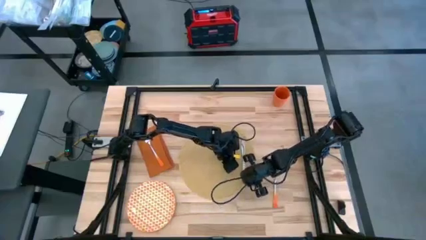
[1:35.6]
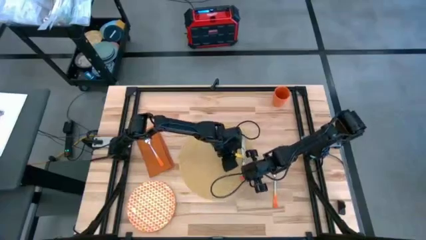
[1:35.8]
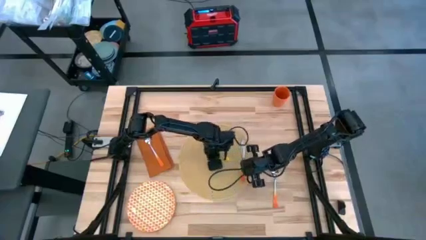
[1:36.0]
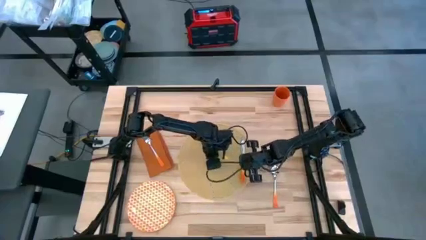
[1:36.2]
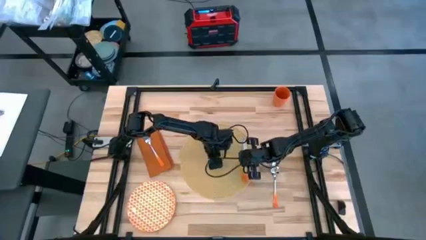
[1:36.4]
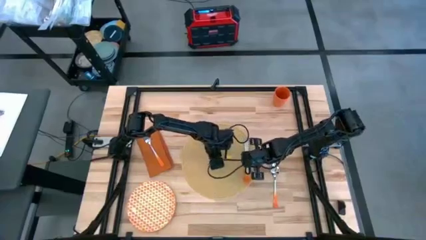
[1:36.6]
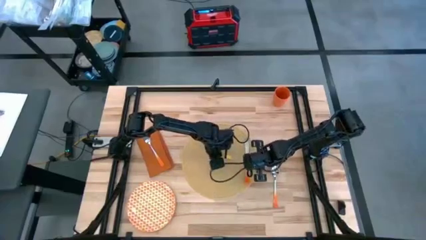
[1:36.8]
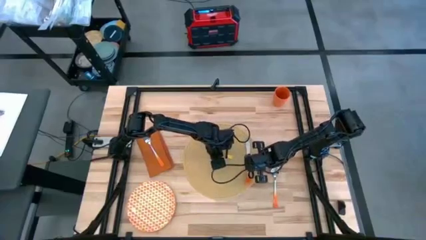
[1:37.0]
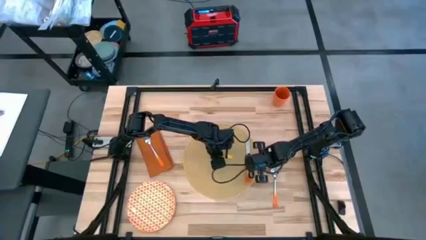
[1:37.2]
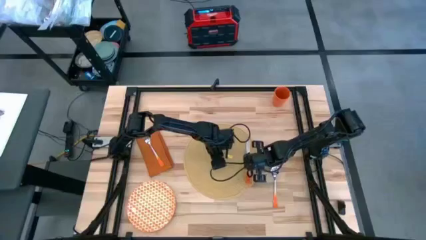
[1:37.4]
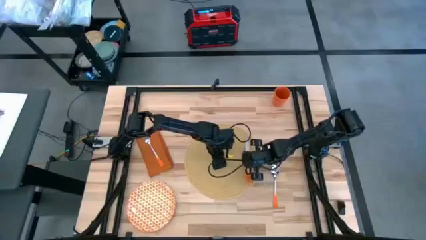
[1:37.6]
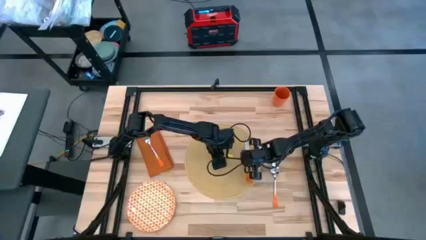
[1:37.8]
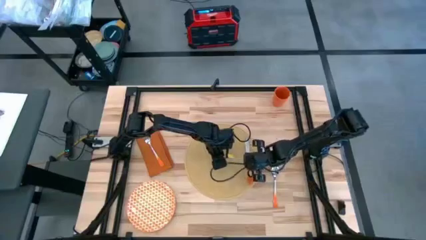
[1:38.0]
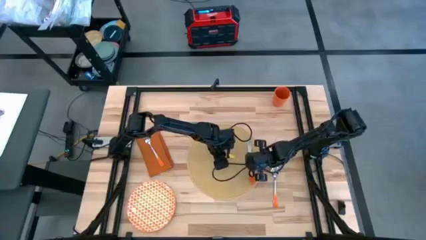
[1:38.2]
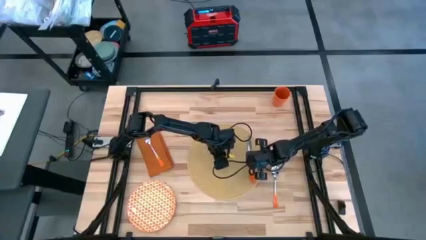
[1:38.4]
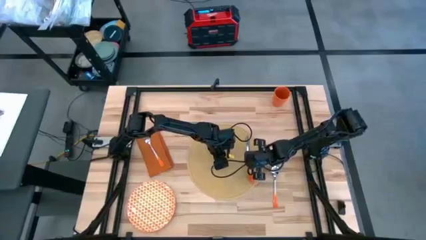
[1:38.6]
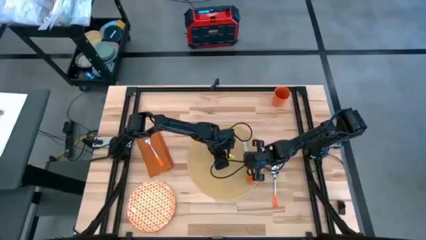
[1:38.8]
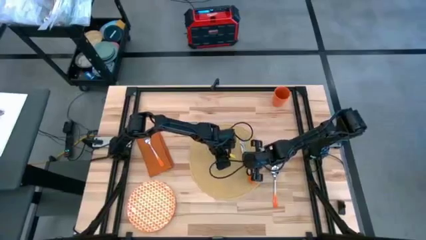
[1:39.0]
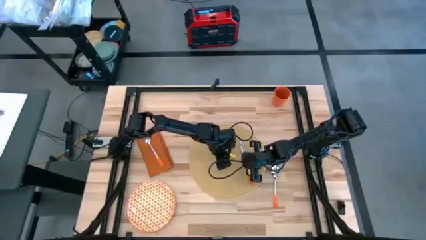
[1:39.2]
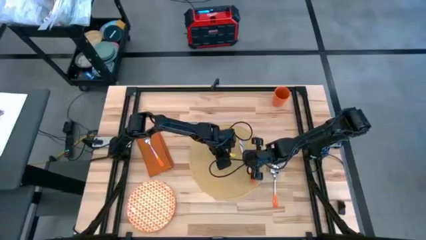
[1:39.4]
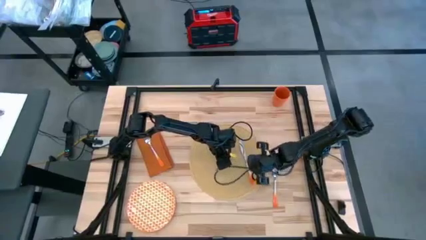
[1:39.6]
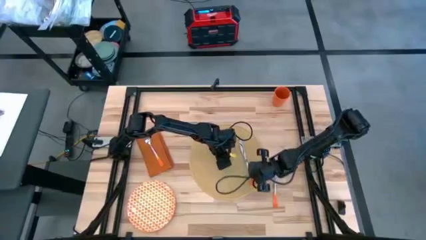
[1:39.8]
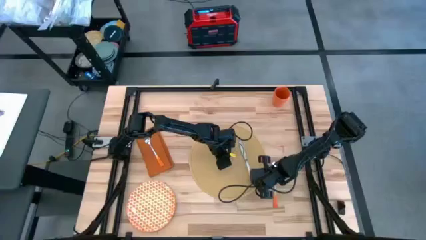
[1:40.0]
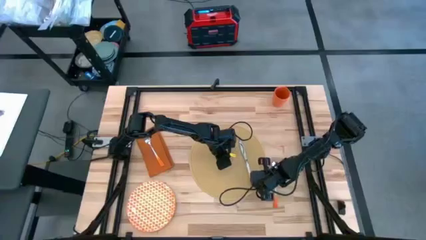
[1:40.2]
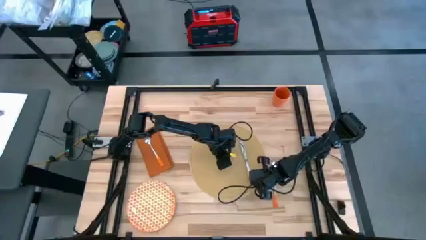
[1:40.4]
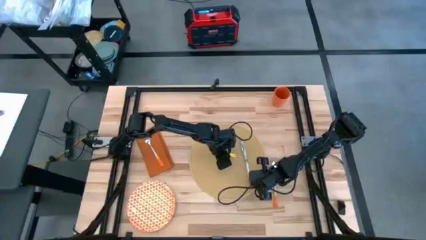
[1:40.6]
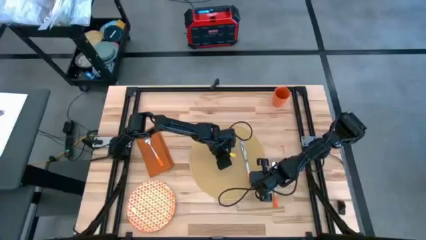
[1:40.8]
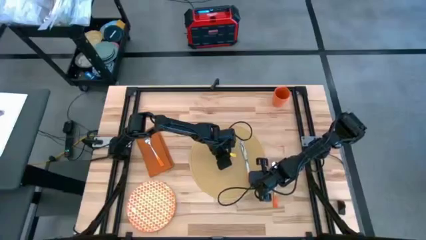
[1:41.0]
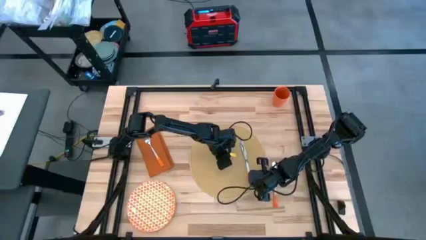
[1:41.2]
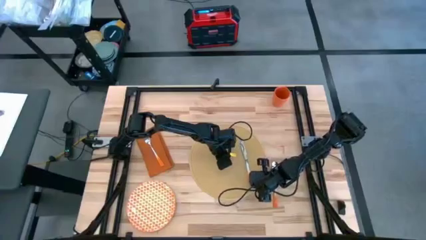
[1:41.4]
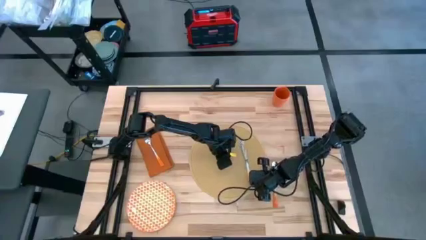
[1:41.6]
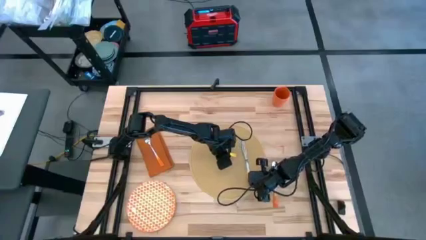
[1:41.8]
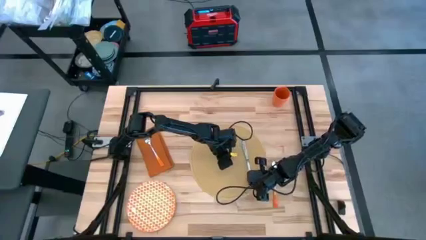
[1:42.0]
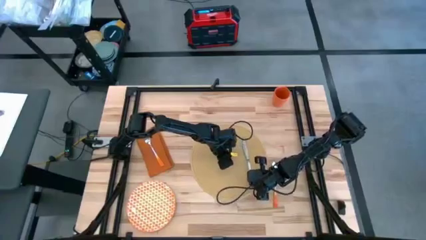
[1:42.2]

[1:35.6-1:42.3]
Task: Set table place
Adjust the table knife

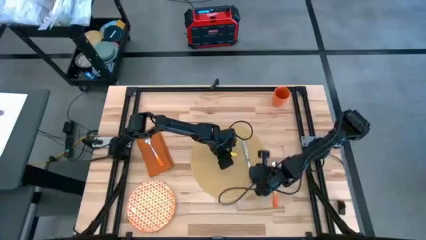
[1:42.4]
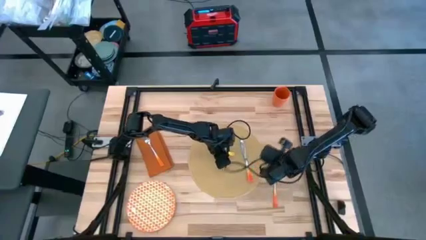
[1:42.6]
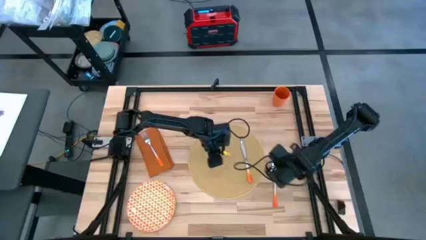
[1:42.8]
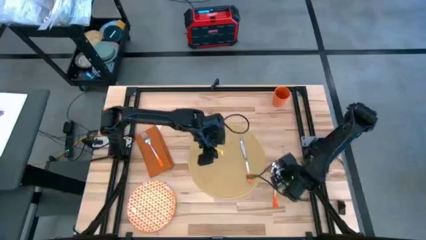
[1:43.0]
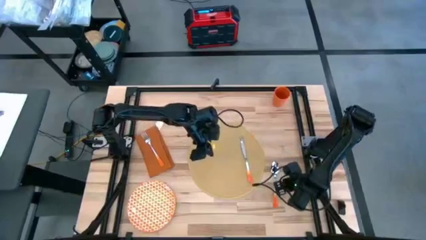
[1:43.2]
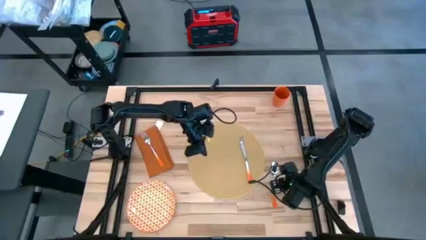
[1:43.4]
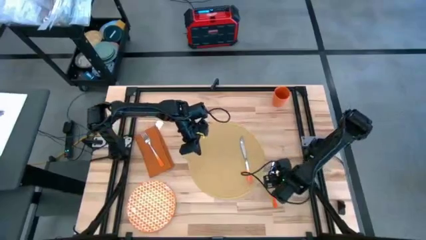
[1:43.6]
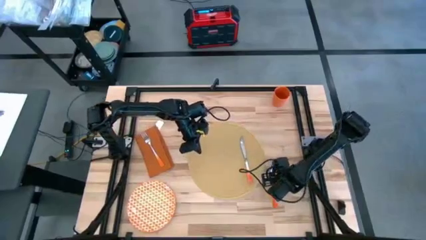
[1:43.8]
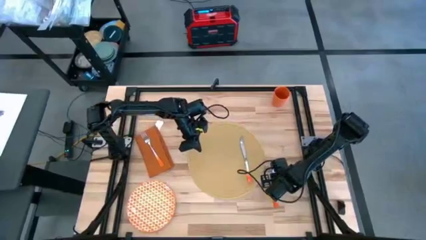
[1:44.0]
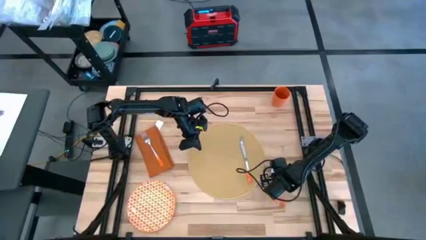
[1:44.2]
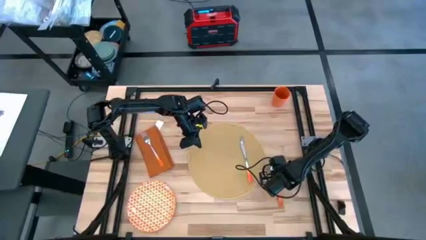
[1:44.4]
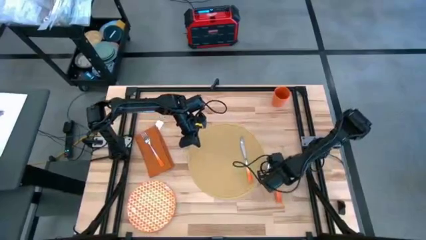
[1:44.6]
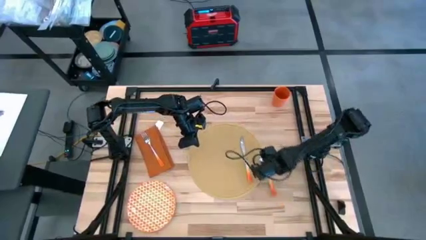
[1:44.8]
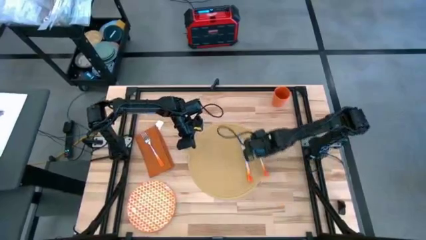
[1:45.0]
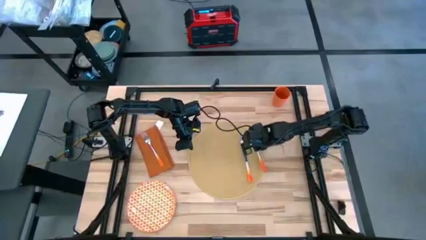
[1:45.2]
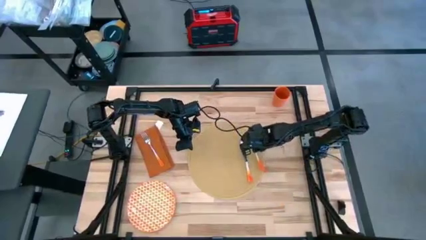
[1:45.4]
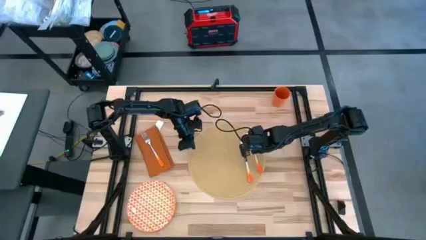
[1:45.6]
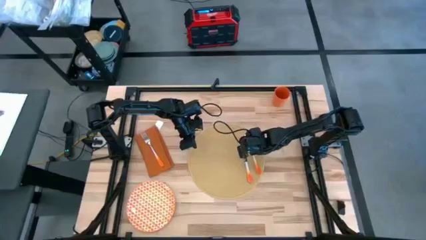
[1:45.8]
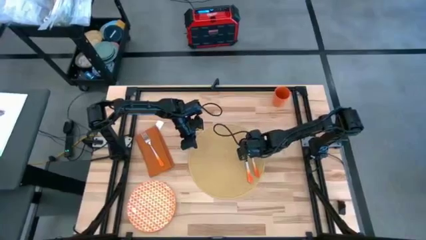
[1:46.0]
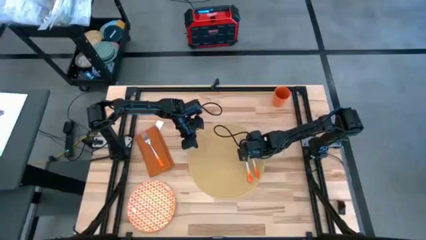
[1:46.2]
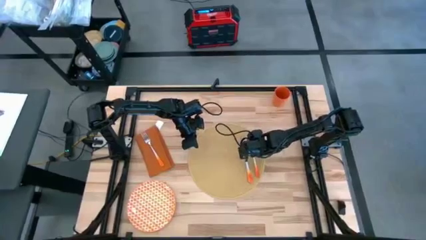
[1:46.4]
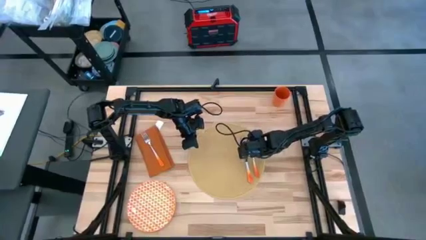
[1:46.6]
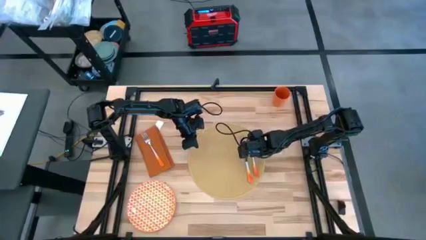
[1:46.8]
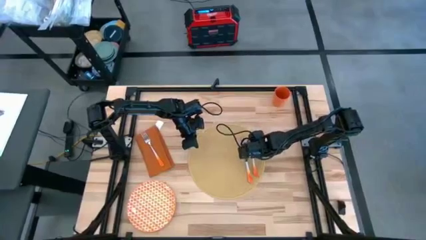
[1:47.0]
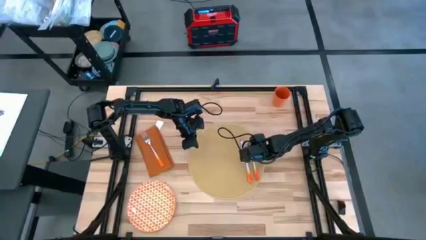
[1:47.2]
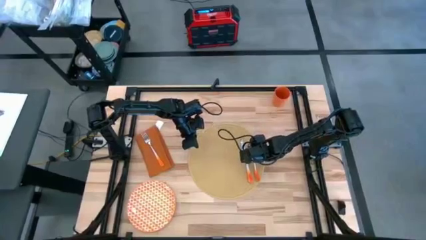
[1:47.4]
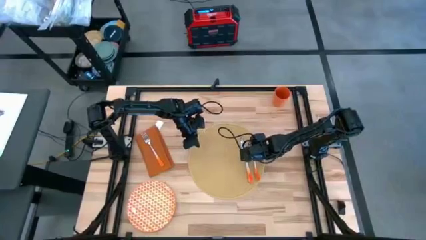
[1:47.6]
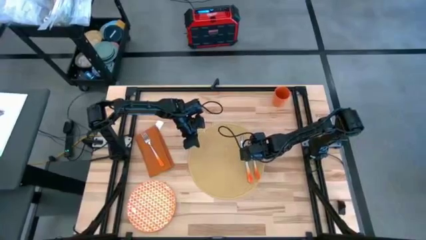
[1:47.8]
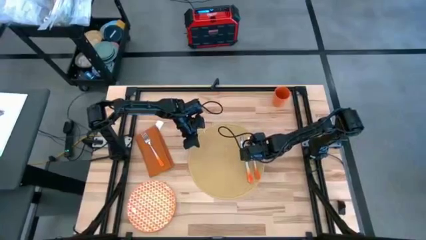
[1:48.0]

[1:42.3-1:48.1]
Put the spoon on the placemat to the right of table knife

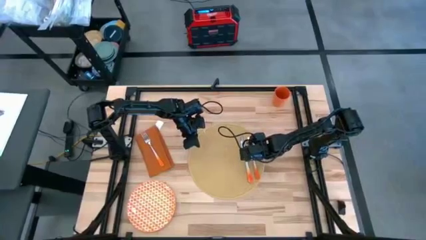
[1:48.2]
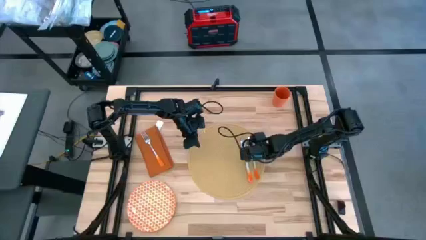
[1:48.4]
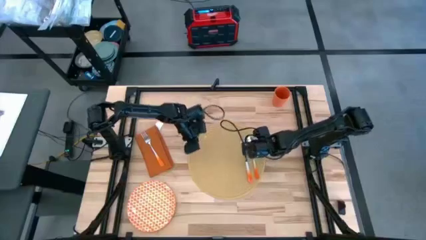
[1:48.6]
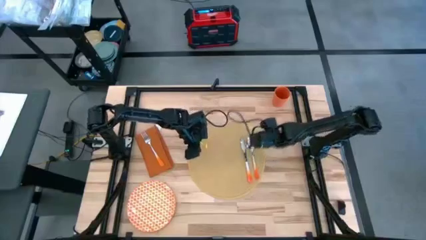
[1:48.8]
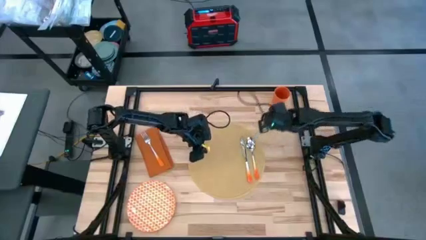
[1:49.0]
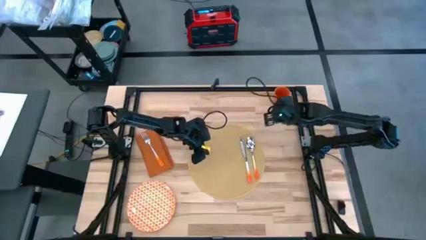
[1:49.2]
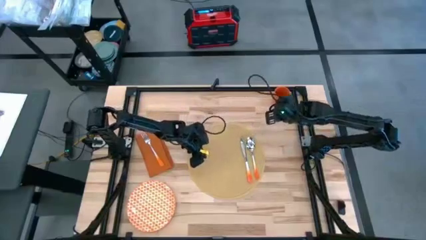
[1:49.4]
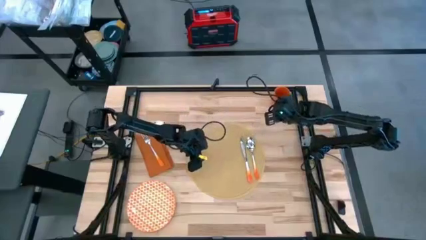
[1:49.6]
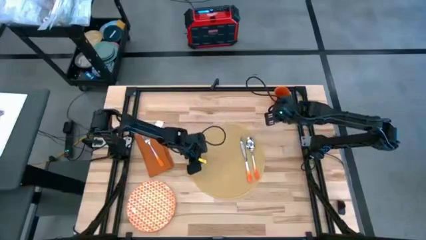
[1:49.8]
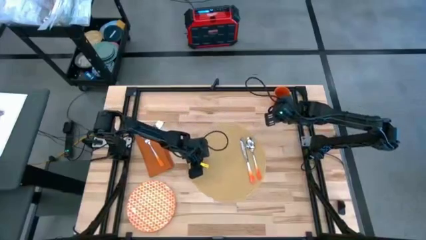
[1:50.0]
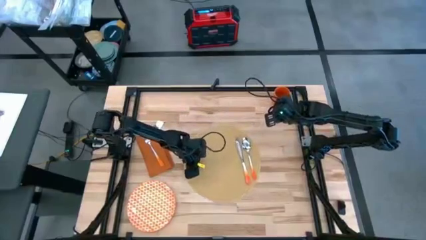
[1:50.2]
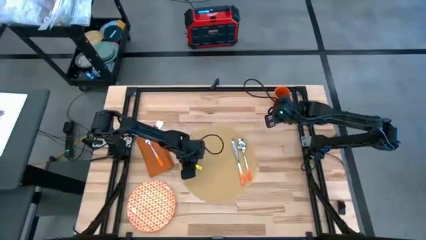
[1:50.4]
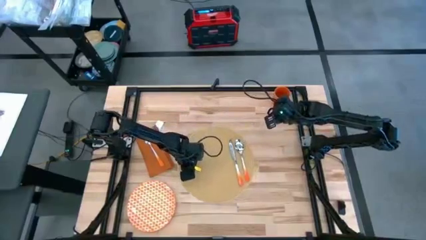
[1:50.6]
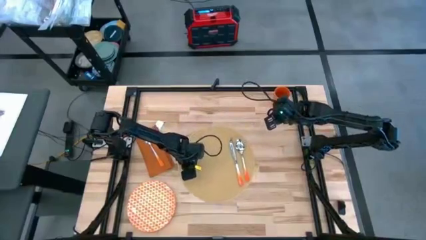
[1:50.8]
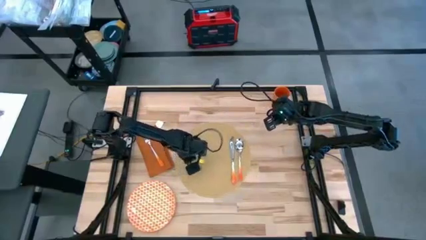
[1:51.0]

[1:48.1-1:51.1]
Adjust the placemat

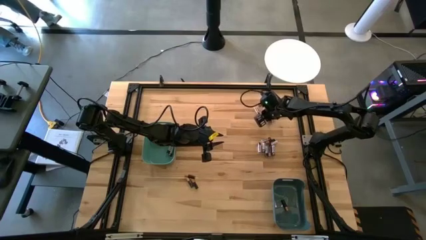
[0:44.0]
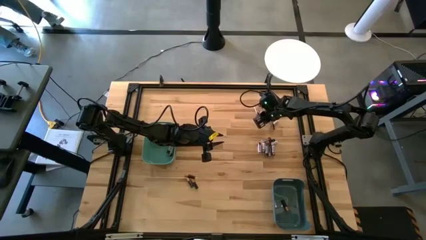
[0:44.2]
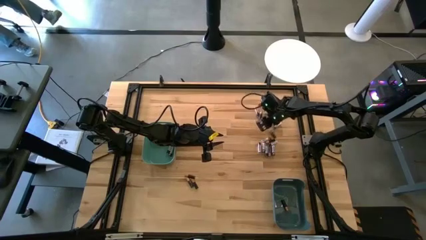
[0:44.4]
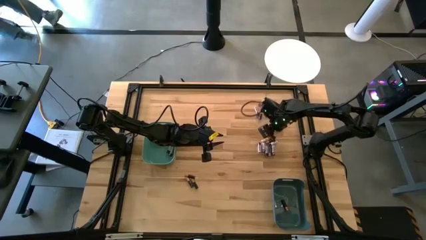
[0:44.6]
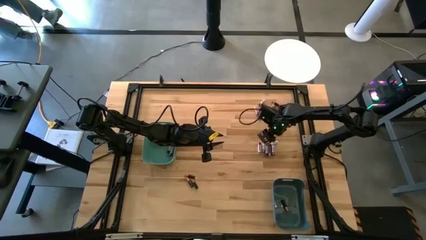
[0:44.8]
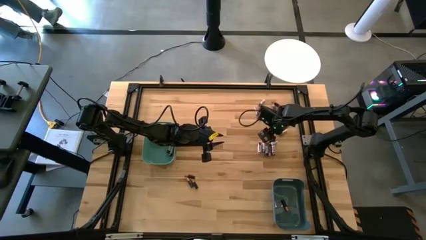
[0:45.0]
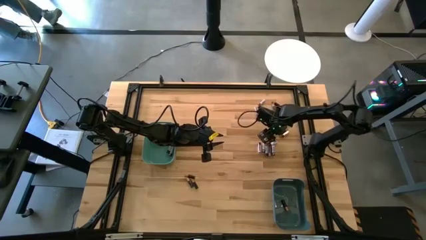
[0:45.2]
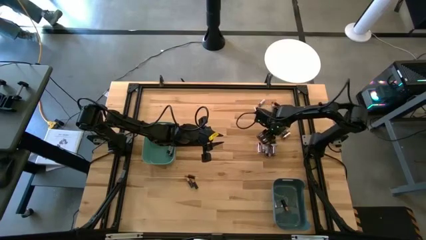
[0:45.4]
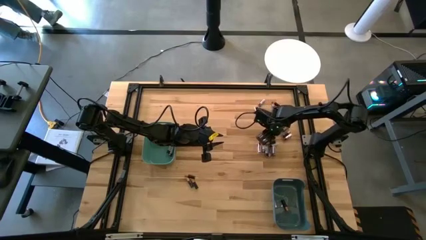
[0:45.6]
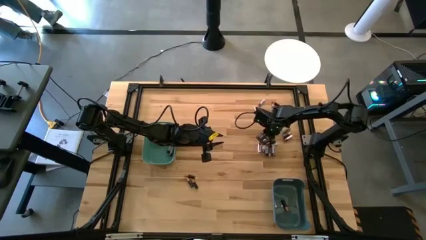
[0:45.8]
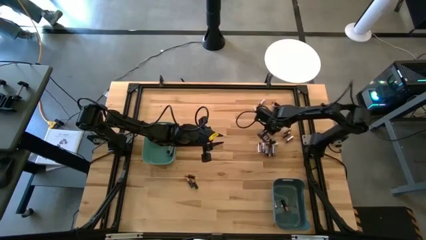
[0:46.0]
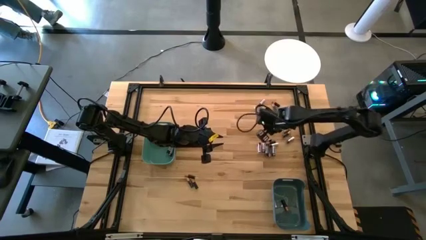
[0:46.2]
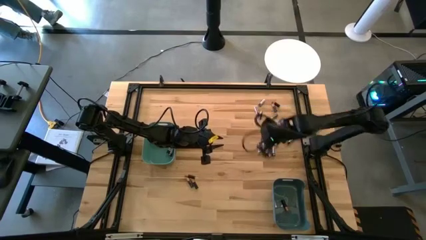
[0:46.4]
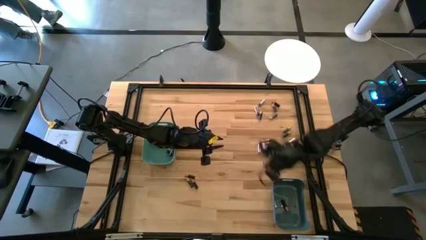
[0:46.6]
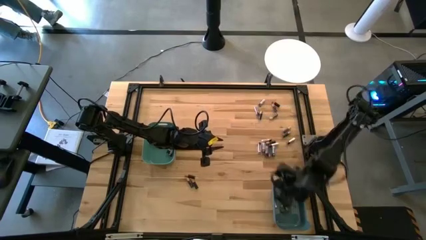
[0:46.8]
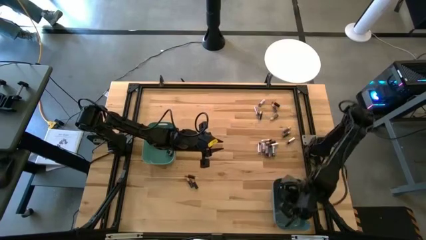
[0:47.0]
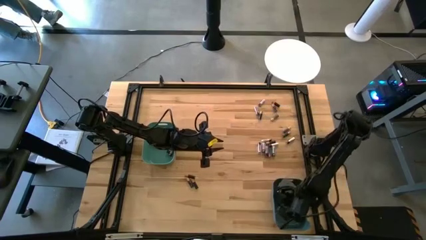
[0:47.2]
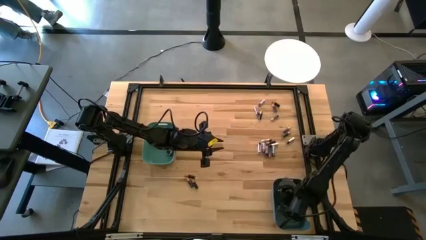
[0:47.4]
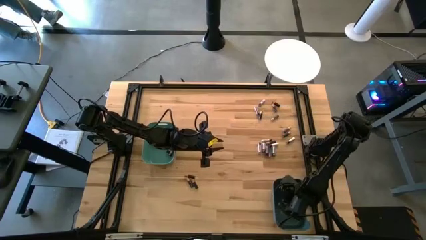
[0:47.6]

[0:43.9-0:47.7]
Task: Sort batteries
Put the black battery into the blue bin
